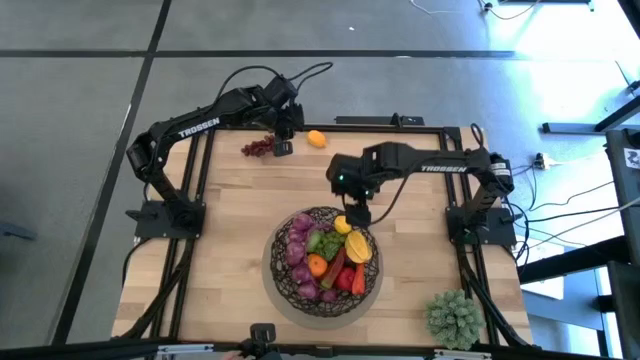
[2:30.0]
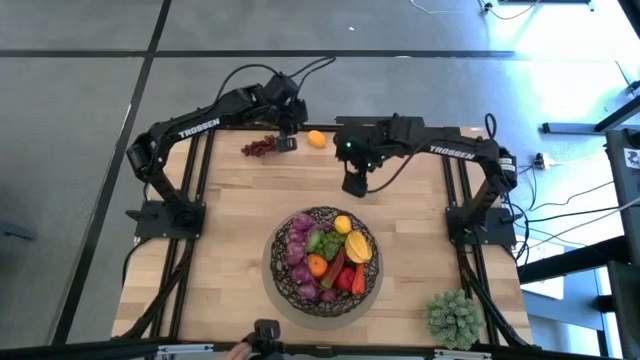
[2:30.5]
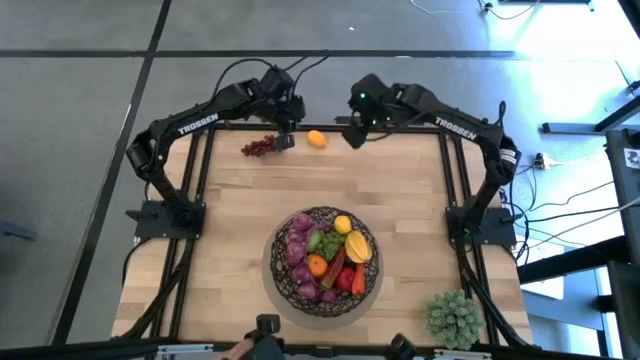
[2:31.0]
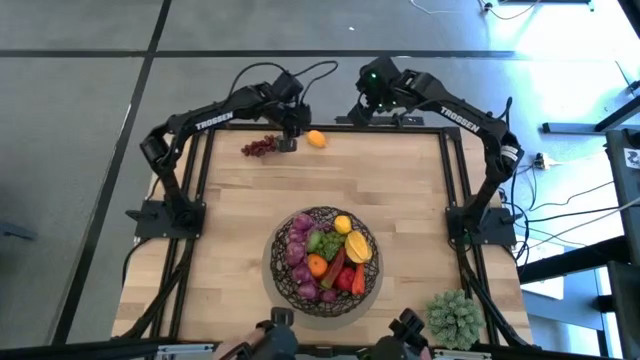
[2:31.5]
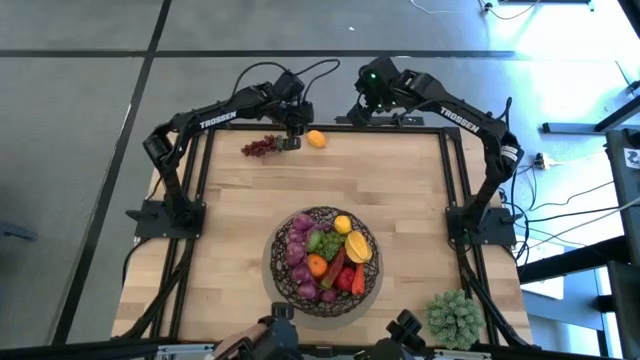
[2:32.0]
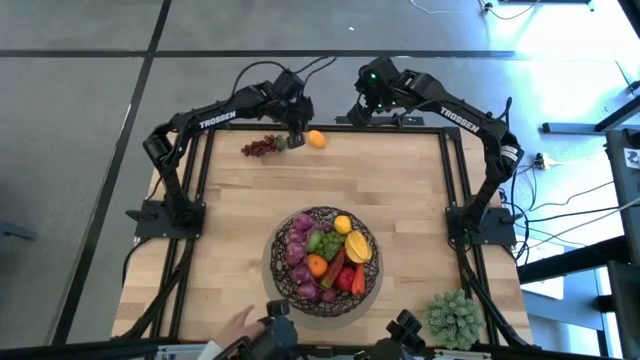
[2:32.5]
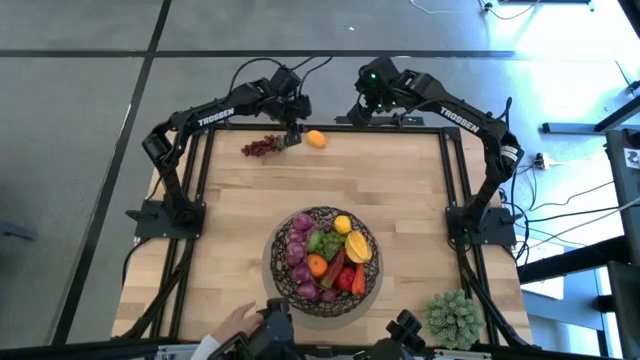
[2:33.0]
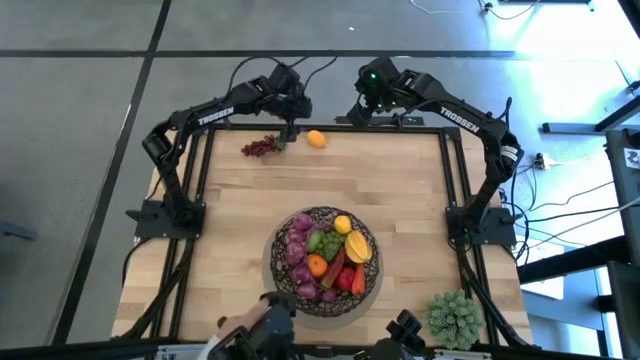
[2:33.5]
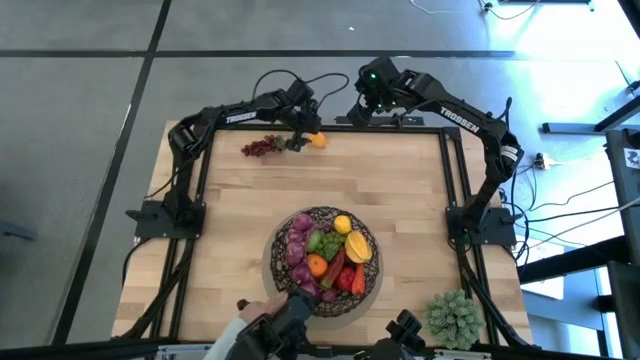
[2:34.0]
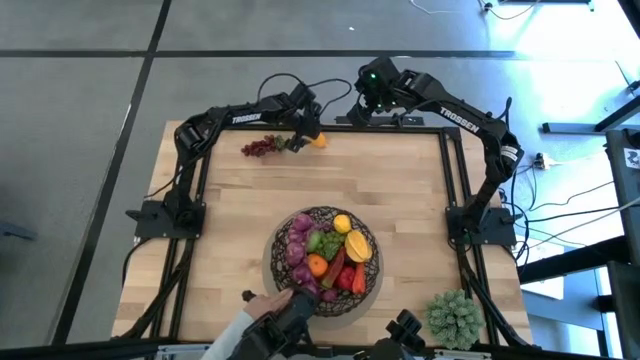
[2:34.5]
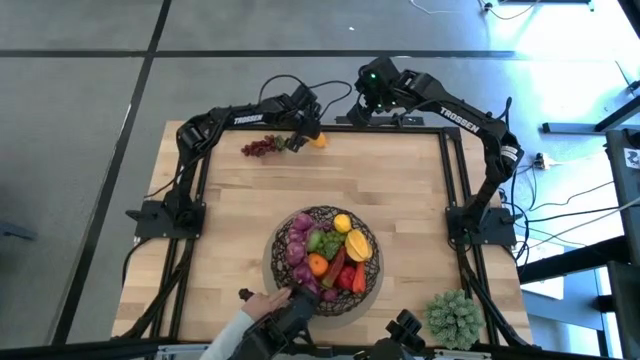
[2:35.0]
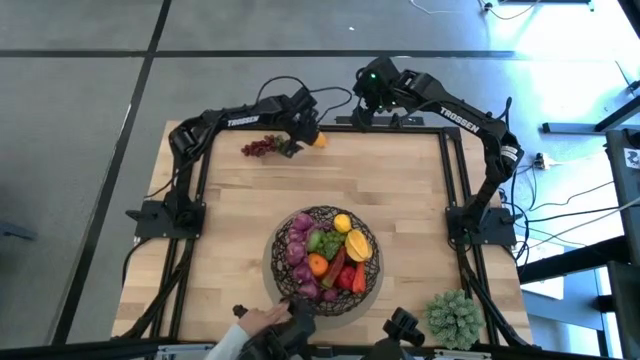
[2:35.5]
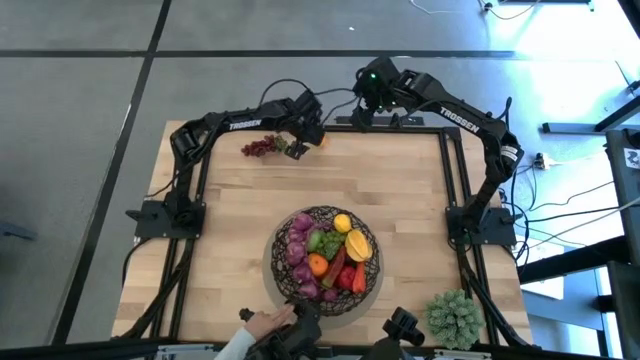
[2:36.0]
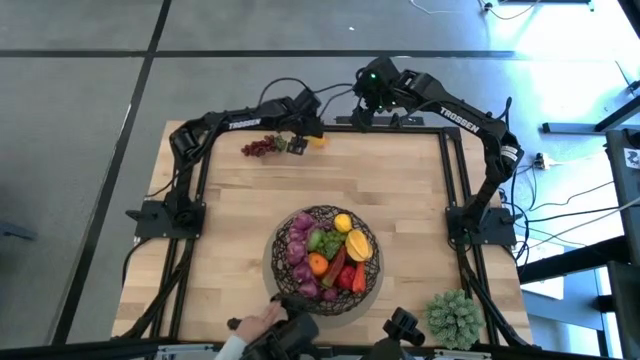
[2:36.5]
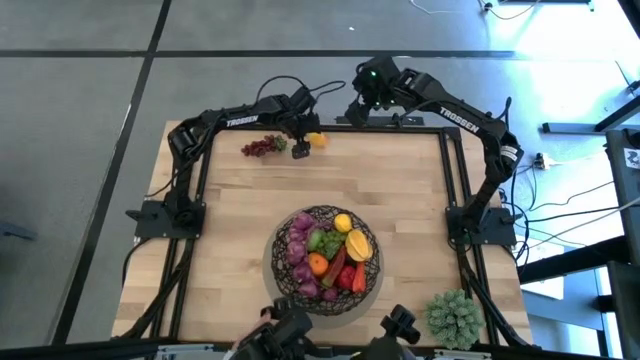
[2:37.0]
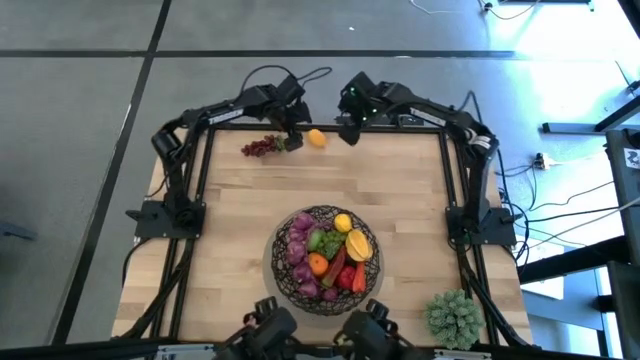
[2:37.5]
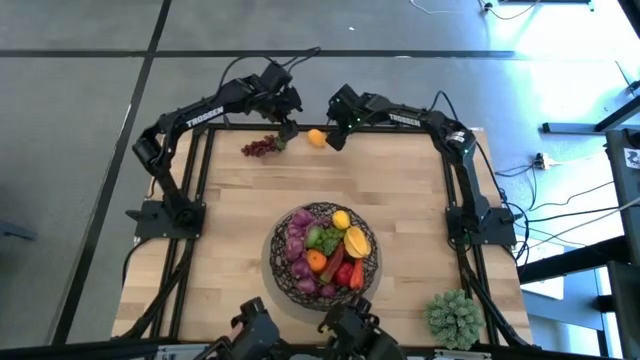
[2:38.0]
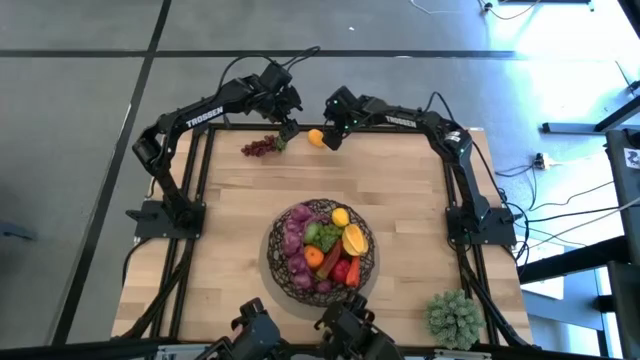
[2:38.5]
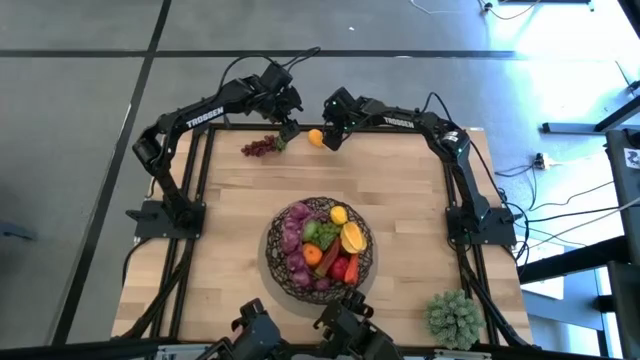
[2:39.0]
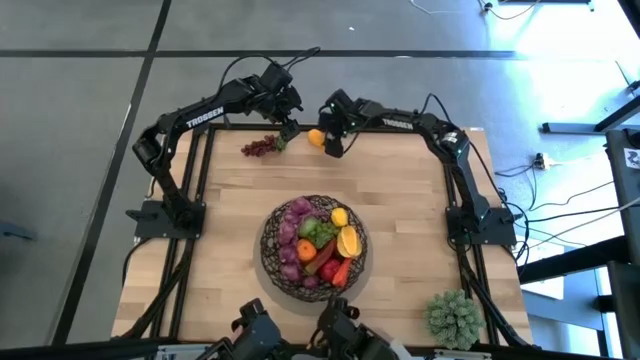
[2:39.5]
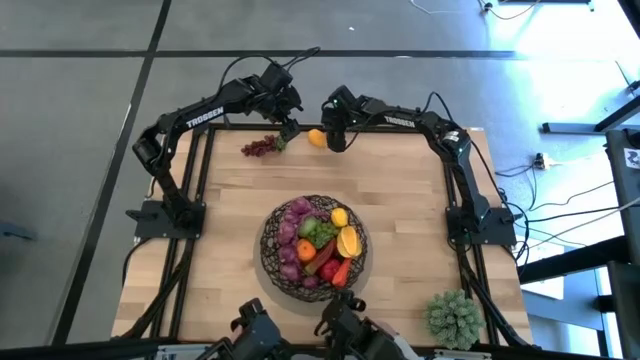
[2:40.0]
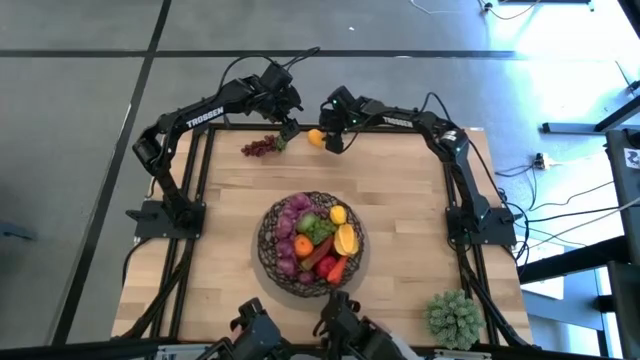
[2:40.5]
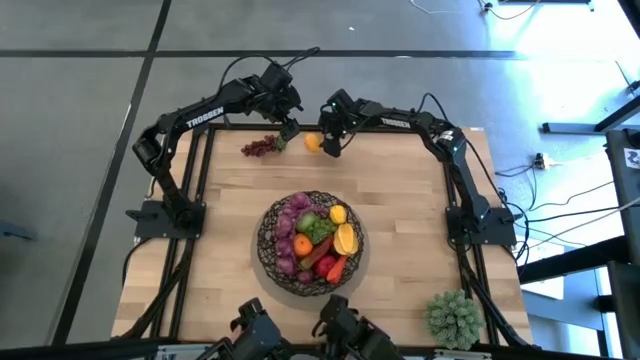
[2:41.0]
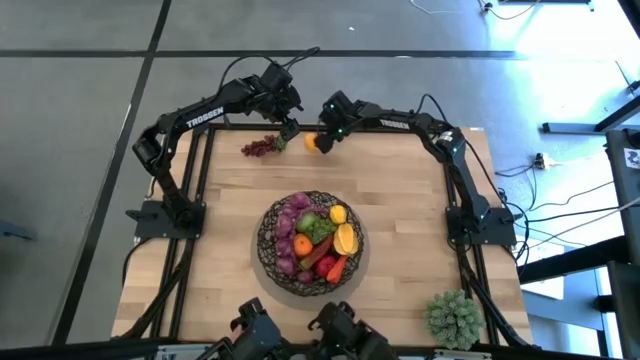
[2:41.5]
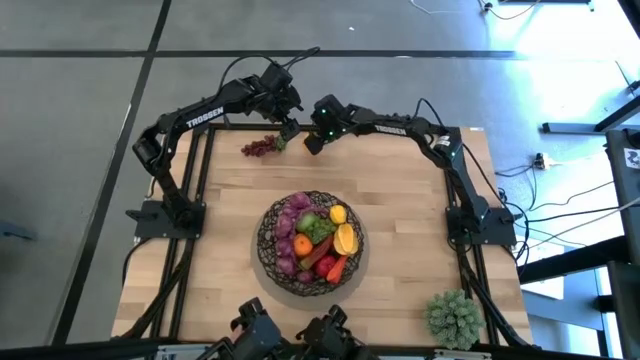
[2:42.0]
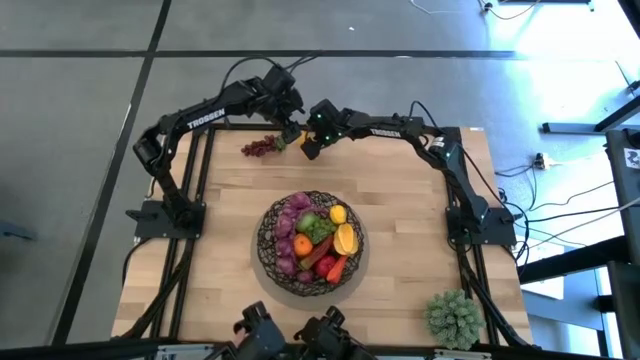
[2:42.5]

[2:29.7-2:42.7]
Task: Build produce basket
Put the lemon into the mesh basket

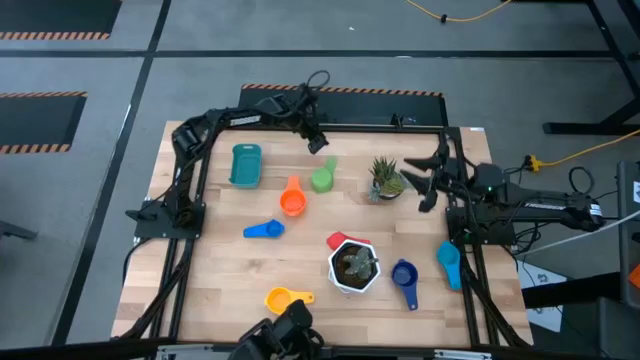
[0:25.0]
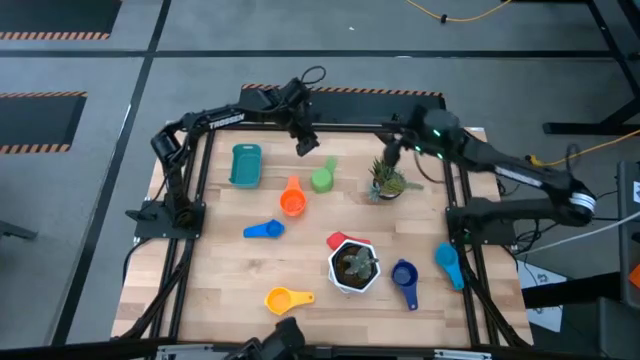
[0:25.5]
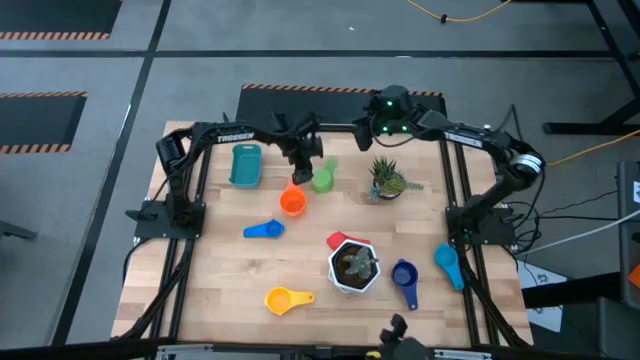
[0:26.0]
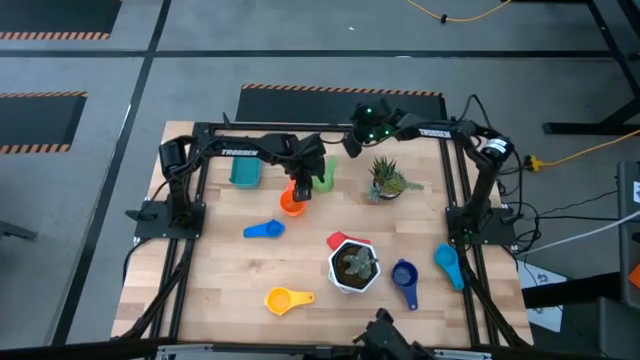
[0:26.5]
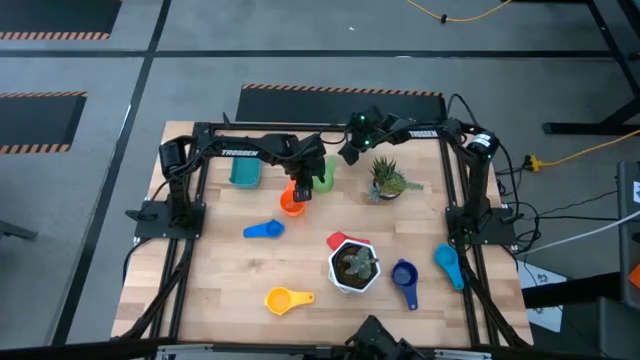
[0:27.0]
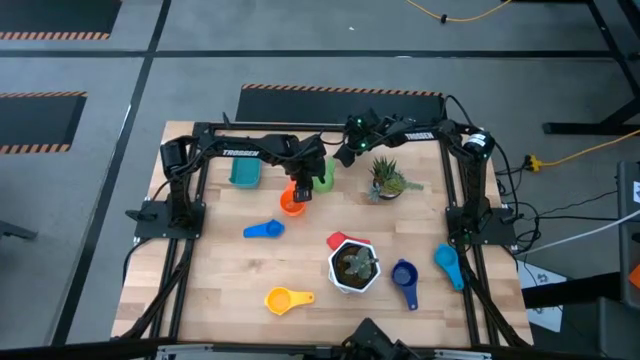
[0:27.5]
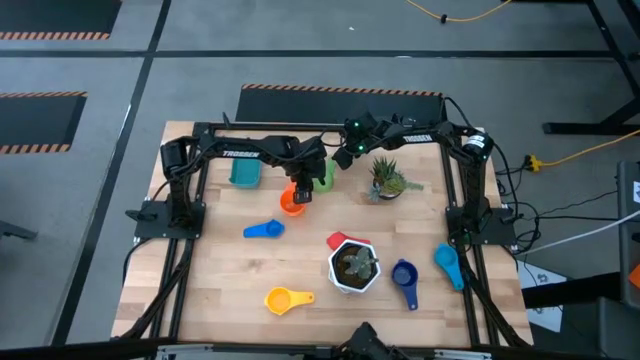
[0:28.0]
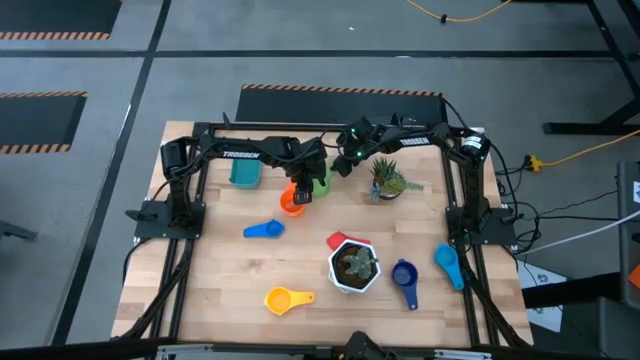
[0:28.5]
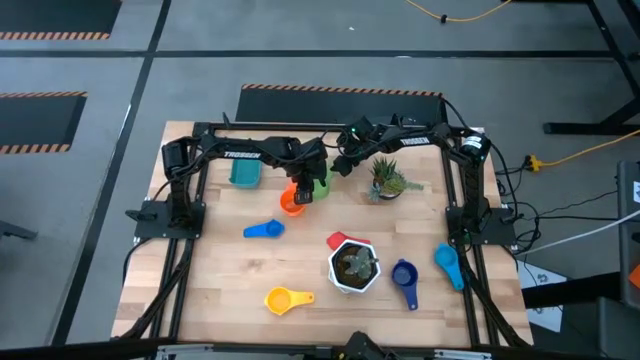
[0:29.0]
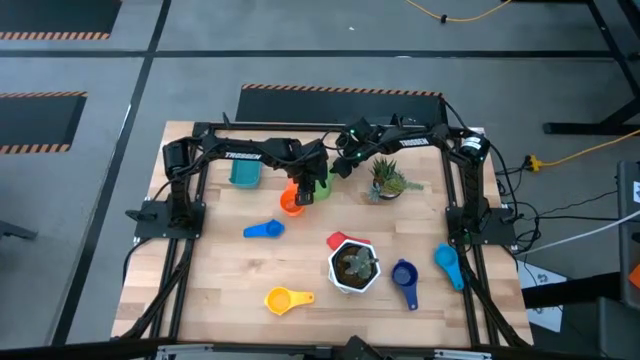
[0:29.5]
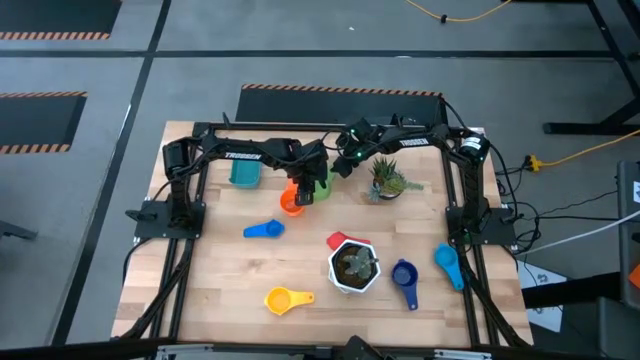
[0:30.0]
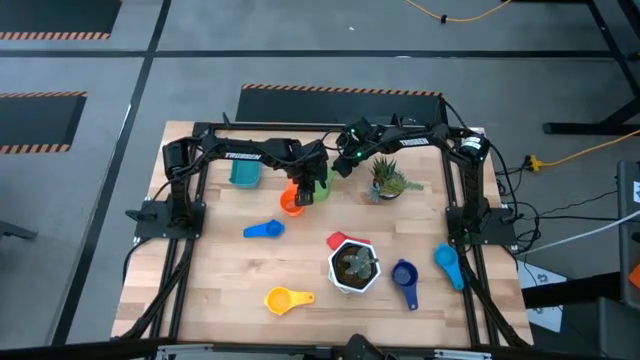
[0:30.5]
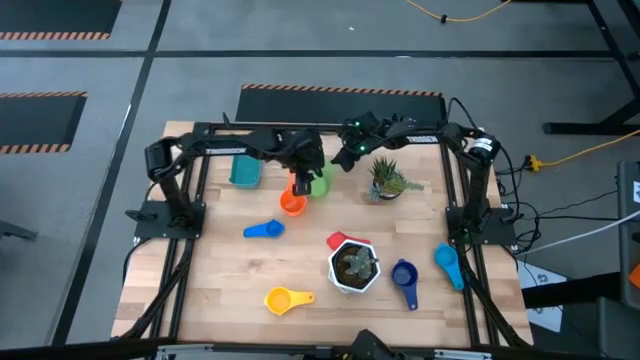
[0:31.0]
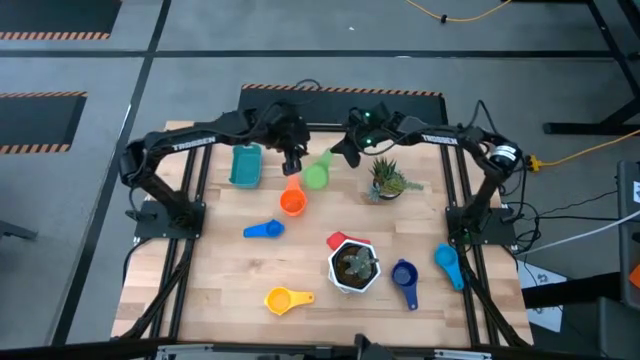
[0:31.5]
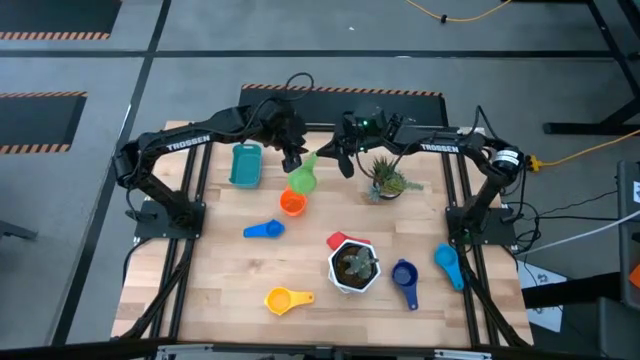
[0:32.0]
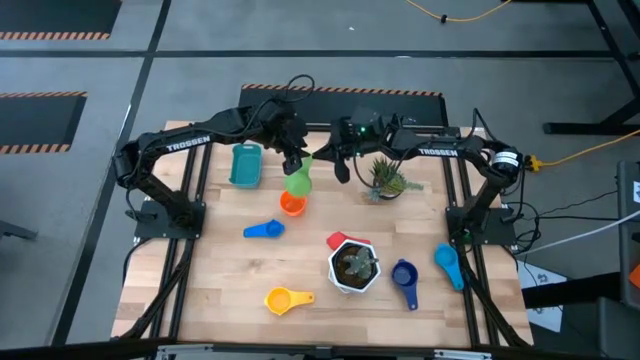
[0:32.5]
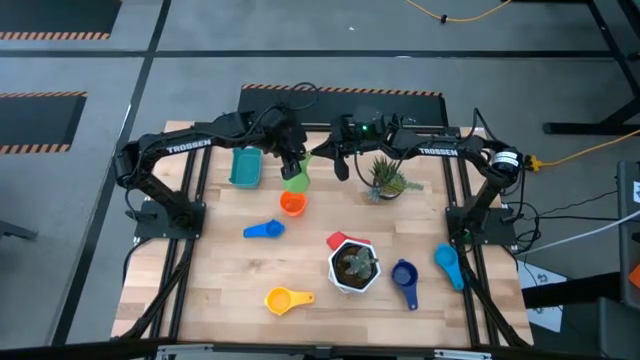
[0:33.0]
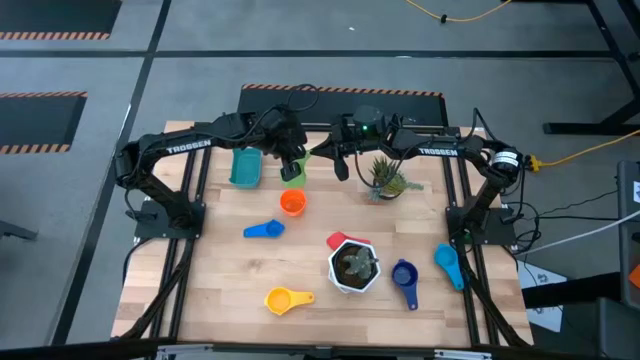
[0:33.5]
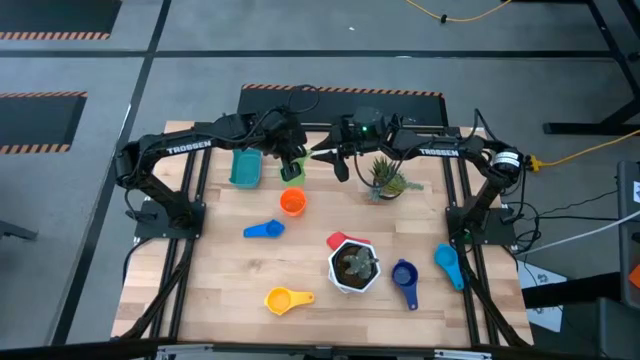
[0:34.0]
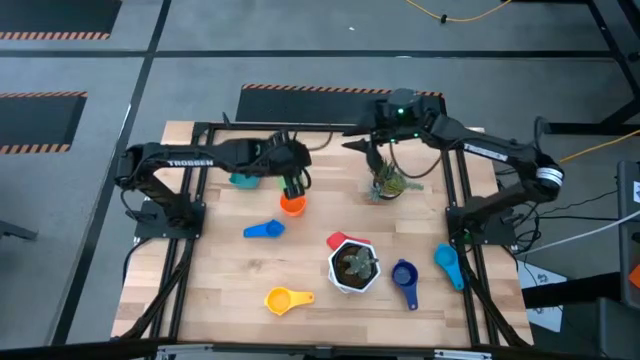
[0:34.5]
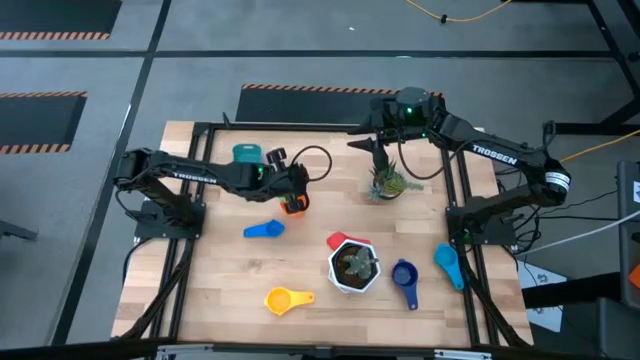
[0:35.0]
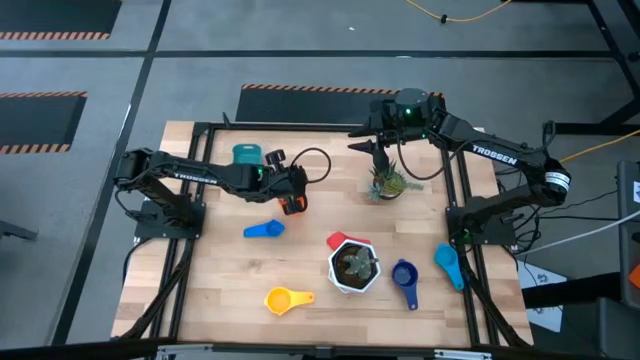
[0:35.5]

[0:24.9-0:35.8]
Task: Nest measuring cups in basket
Stack the green measuring cup into the orange measuring cup
